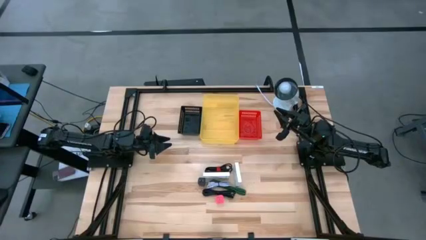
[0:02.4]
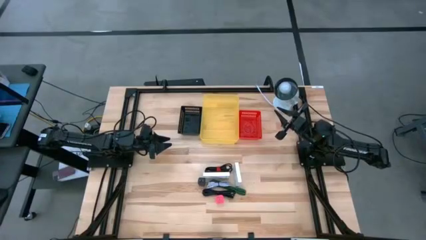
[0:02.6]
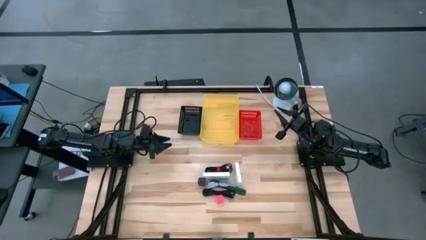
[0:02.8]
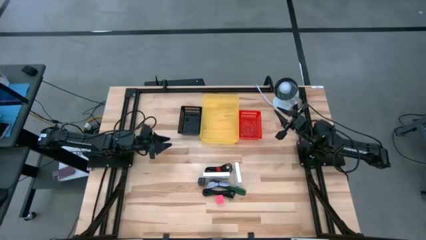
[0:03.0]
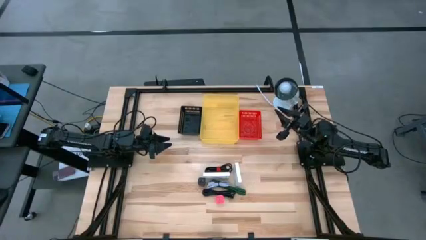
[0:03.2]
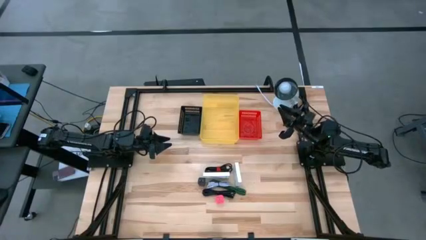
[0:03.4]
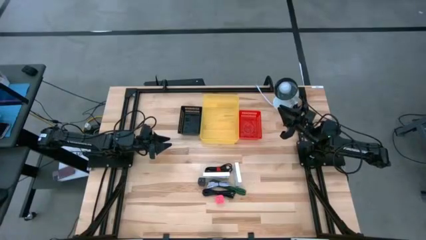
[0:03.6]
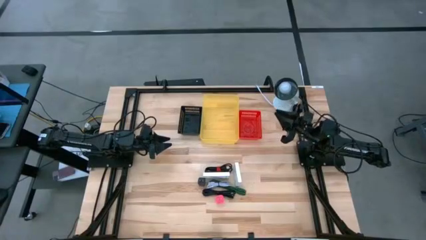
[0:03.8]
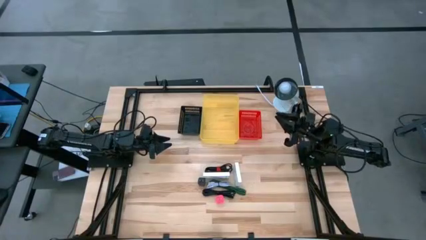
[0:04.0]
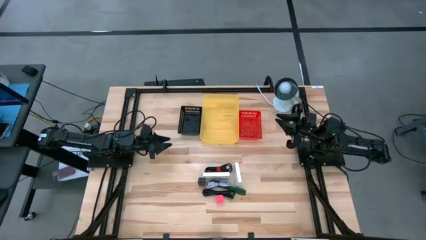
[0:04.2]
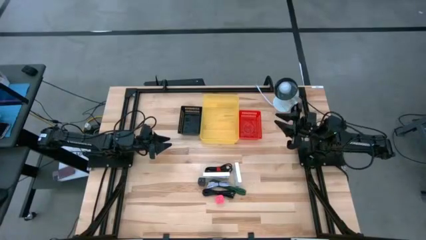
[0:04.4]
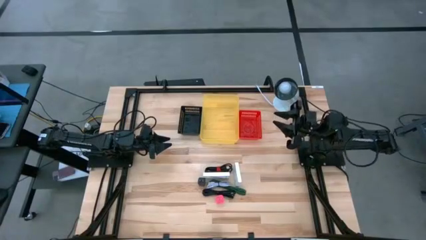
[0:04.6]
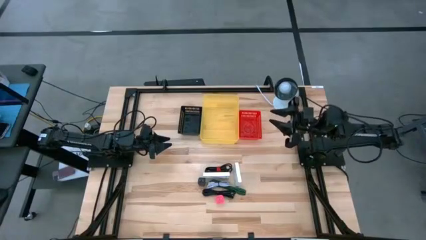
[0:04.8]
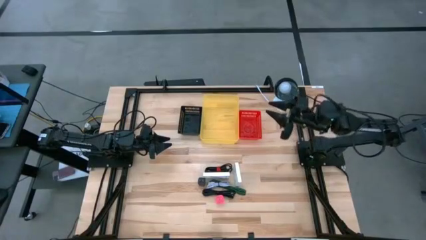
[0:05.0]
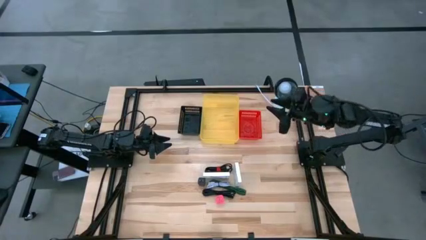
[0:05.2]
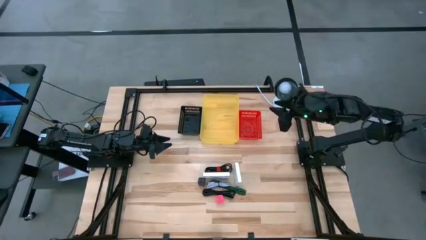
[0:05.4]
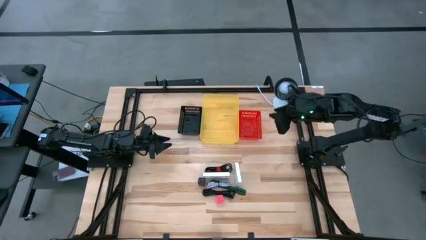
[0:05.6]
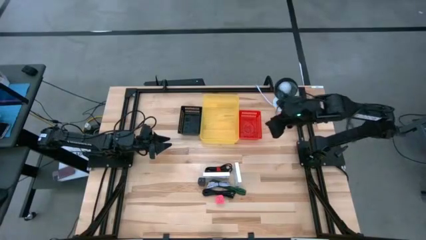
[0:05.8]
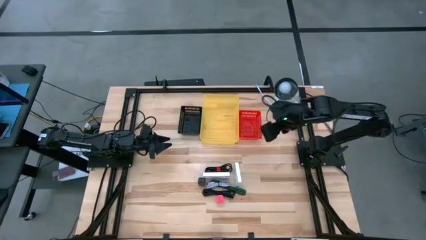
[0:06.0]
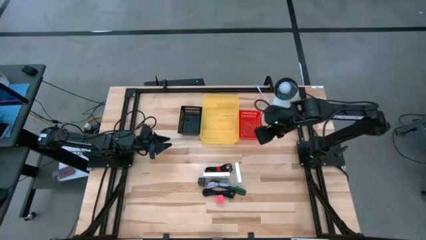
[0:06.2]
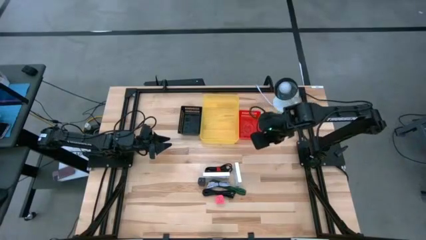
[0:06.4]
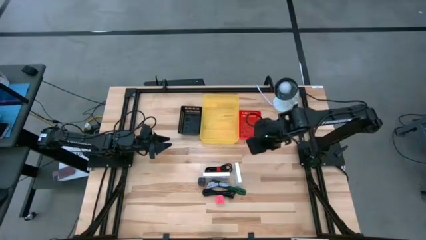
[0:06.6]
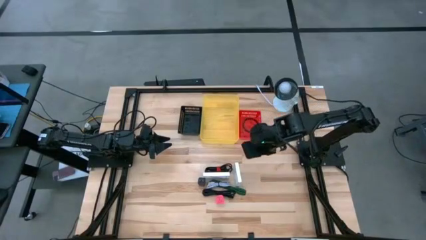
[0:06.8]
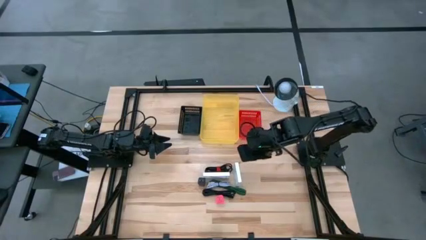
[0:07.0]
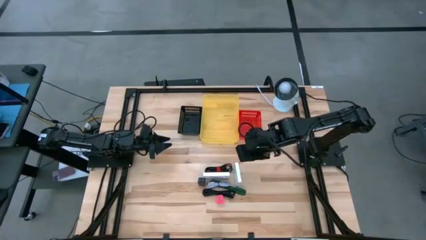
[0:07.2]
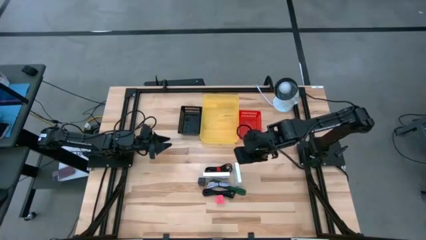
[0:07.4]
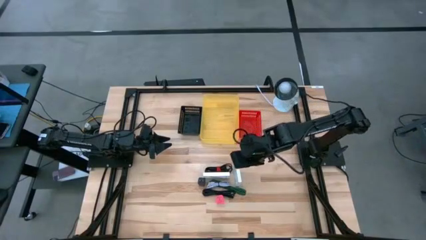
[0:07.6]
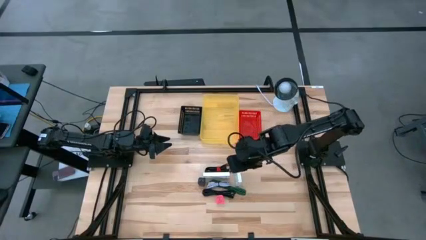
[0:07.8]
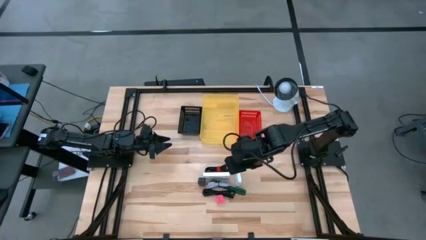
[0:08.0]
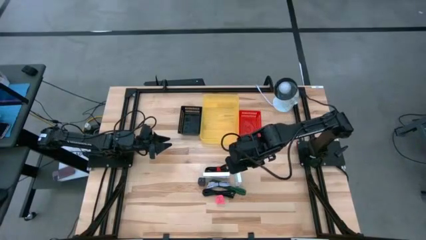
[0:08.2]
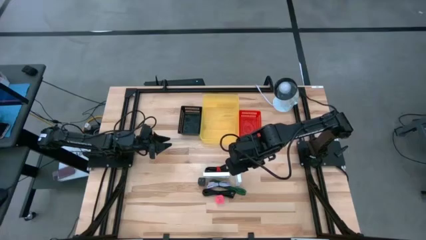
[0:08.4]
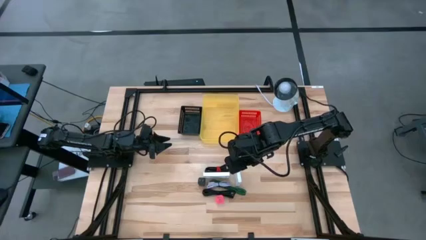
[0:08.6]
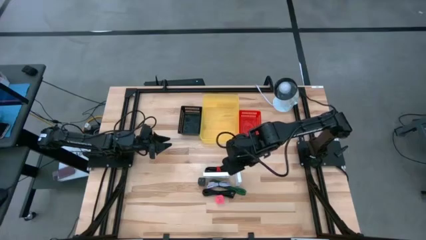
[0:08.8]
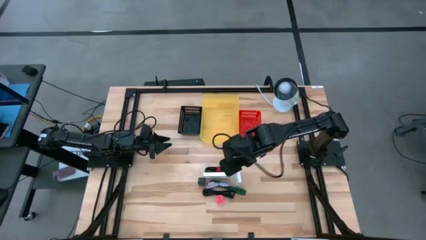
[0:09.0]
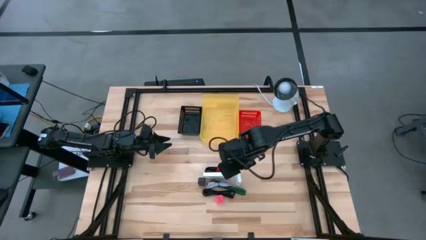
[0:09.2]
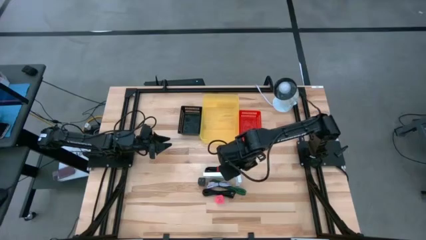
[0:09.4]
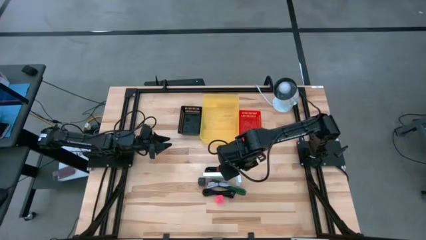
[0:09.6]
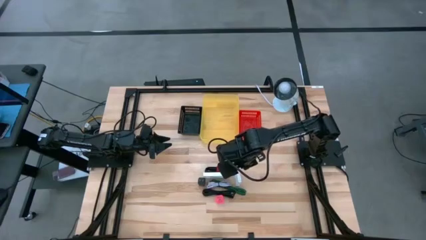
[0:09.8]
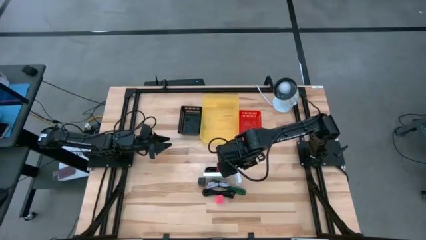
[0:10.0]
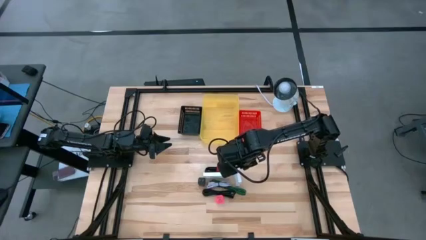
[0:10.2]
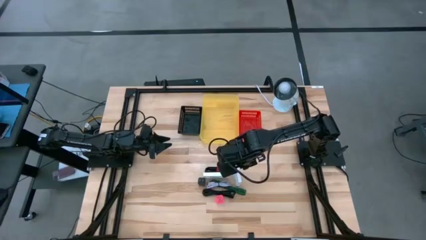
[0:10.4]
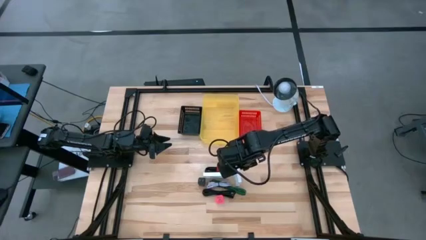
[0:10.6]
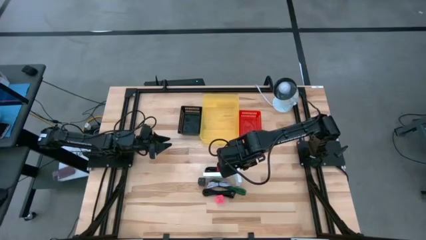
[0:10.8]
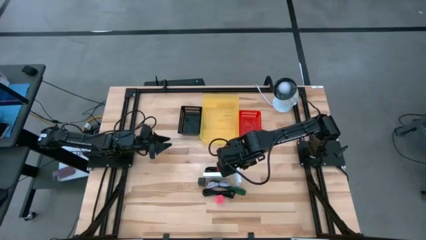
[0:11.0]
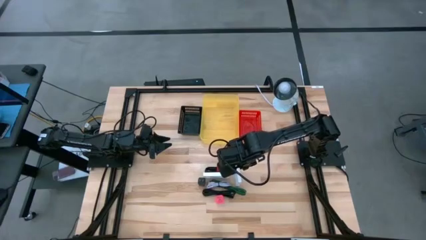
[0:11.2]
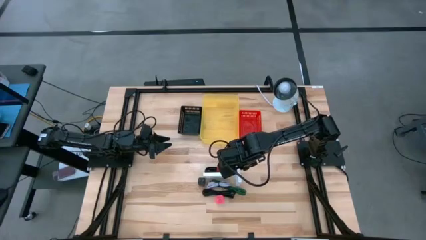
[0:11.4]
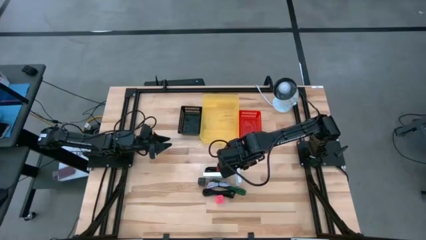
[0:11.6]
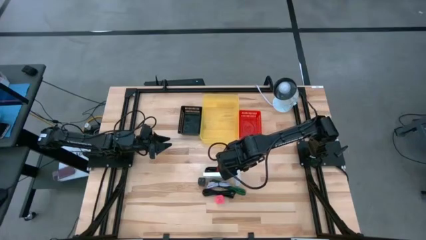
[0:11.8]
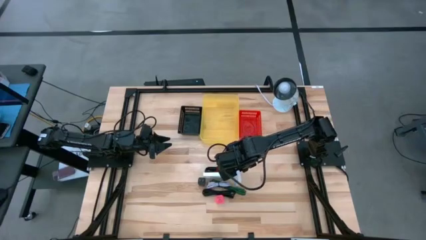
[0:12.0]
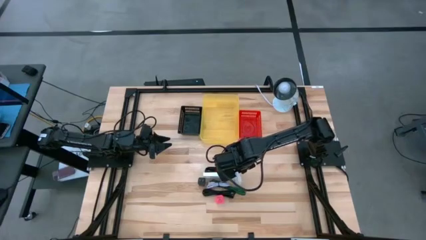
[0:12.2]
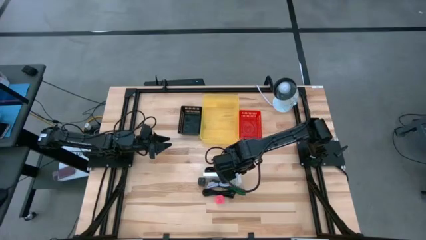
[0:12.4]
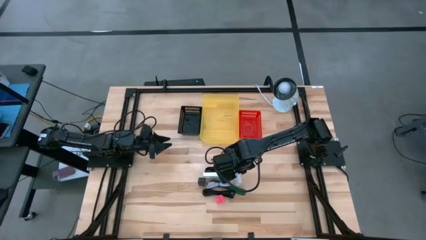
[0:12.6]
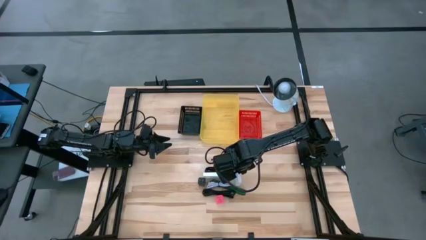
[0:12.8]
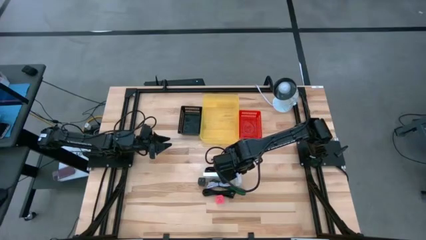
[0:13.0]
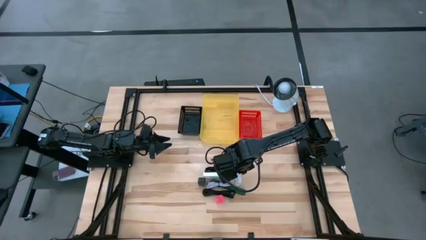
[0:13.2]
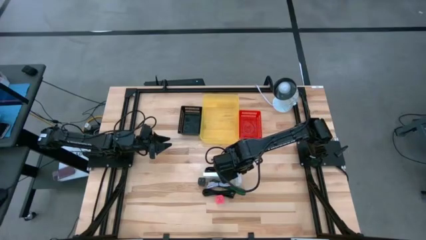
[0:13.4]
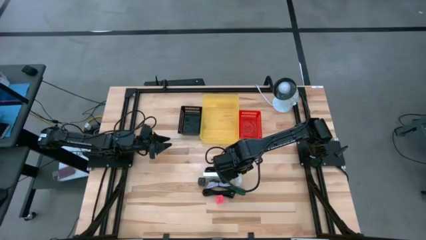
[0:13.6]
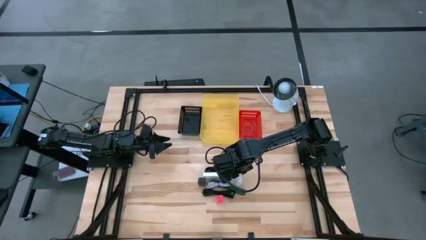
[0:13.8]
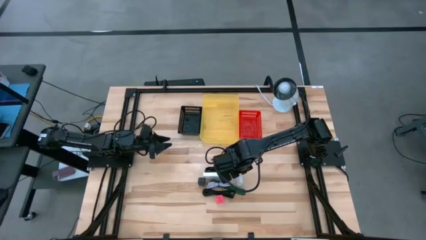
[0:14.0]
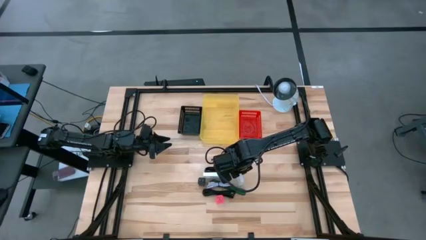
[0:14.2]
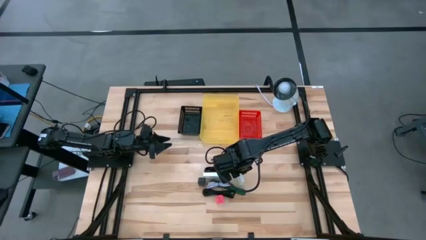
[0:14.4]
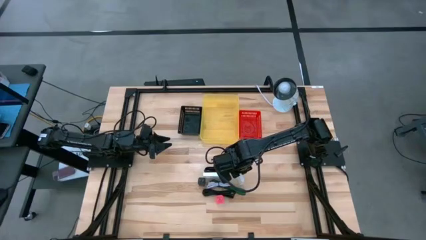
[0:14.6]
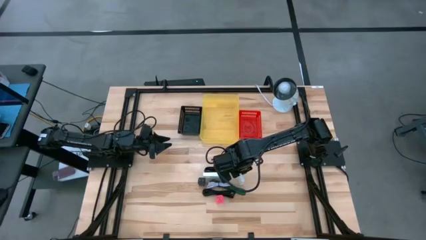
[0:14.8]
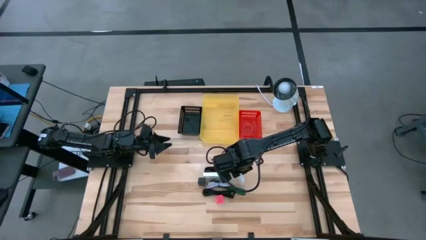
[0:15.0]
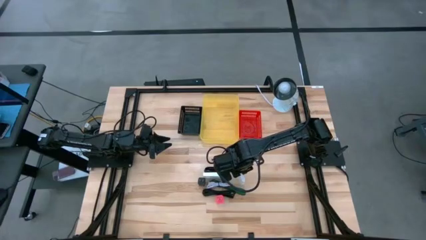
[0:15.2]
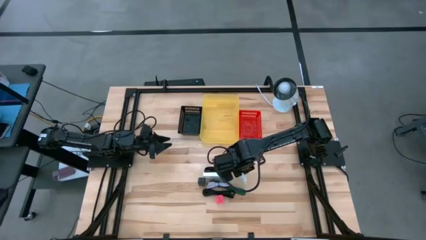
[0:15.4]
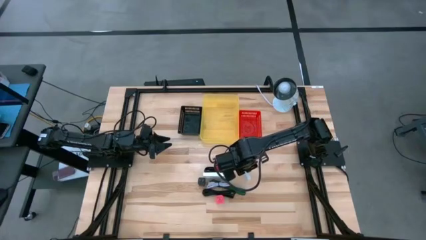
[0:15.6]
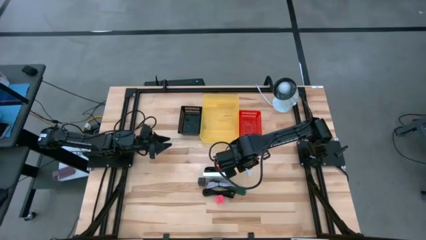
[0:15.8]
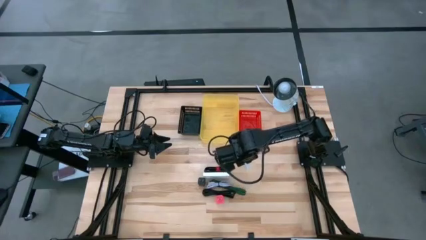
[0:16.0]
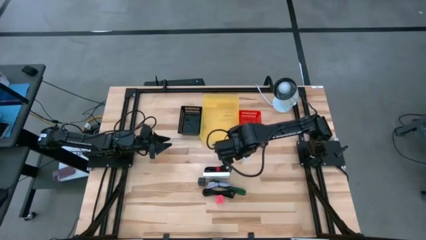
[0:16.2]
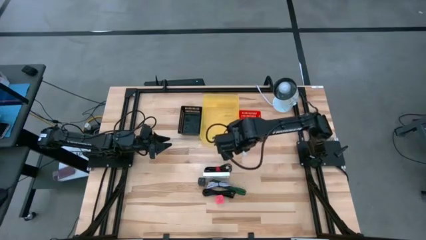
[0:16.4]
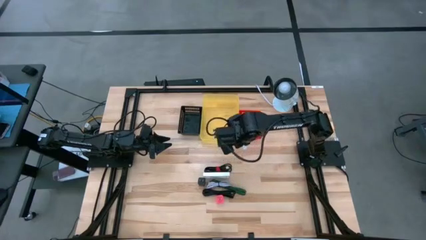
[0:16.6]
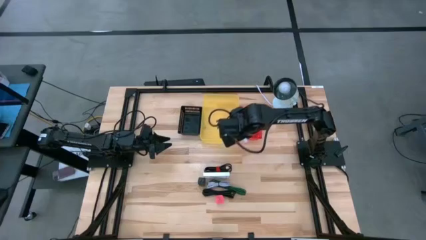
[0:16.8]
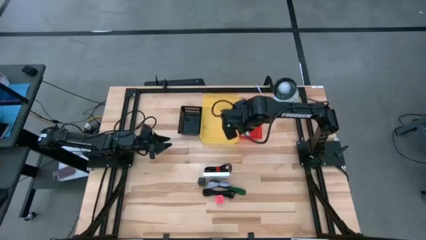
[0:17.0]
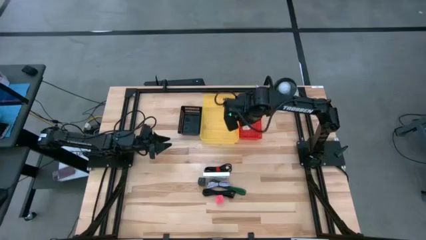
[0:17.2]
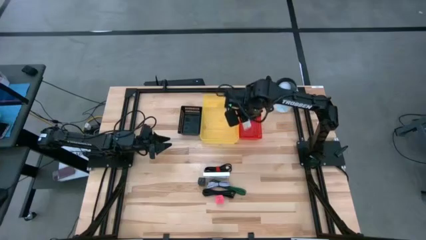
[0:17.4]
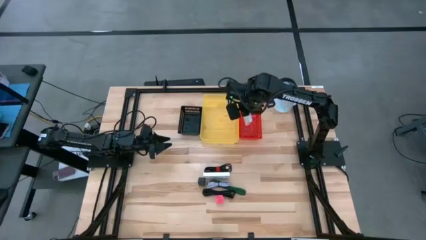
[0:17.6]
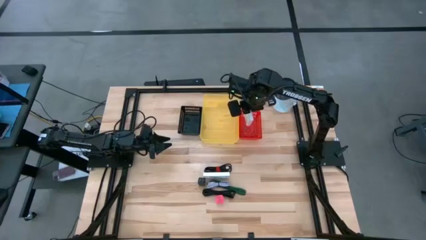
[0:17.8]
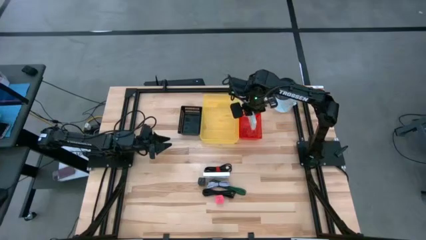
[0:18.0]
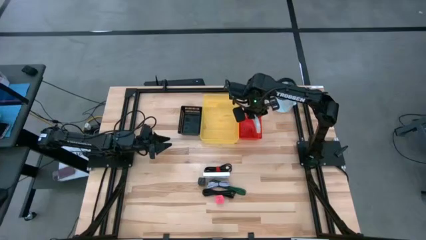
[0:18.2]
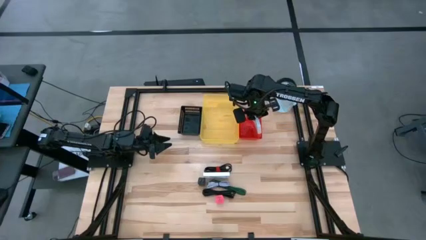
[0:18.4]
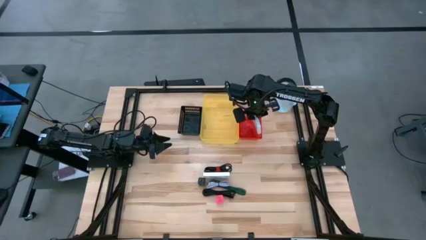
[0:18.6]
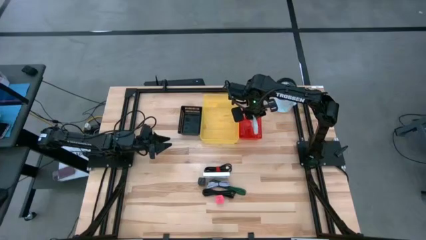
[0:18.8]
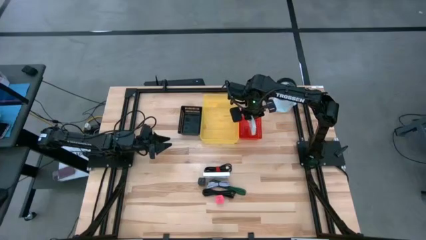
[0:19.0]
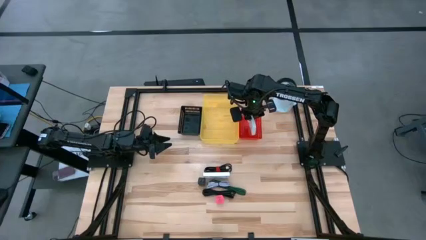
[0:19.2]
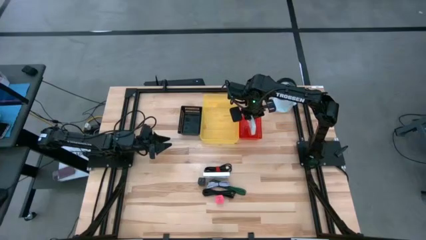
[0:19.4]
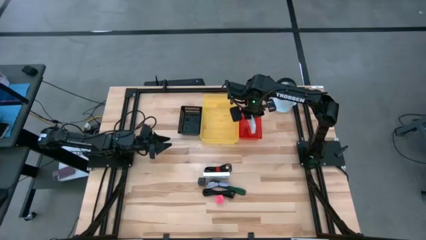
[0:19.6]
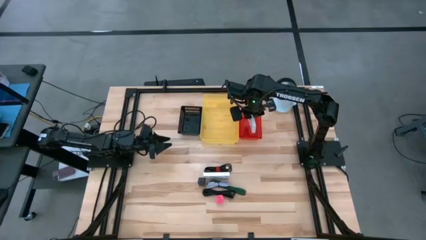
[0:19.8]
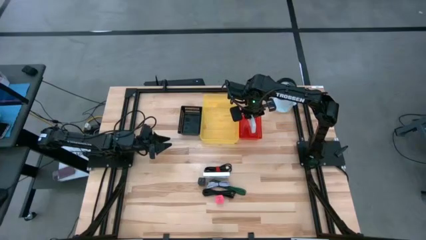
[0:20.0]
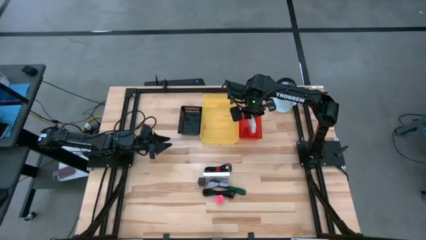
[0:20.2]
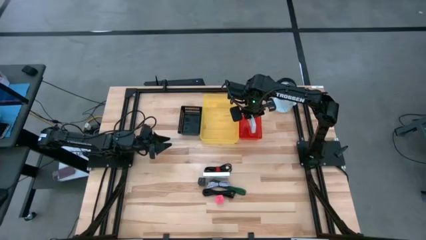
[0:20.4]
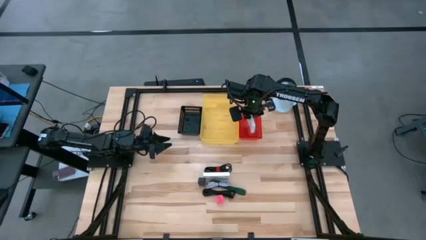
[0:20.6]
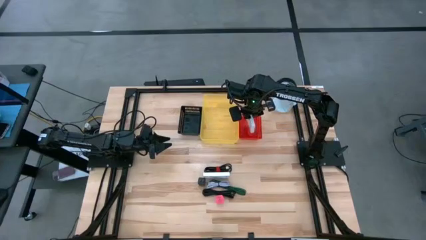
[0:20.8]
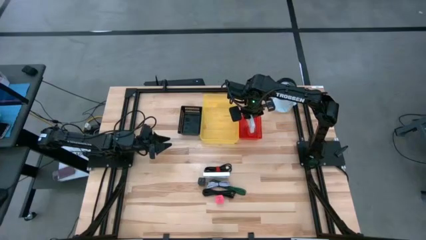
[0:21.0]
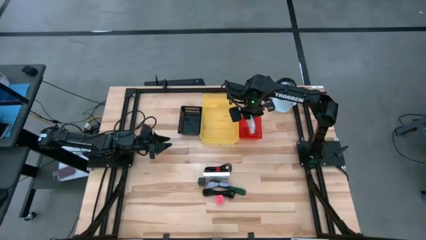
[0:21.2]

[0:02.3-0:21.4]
Task: Pick and place items into bin
Put the right card reader box into the red bin
